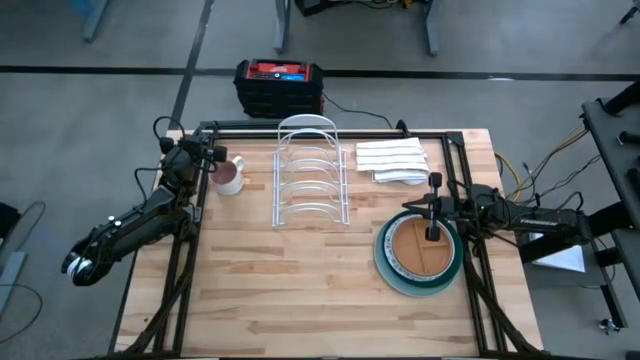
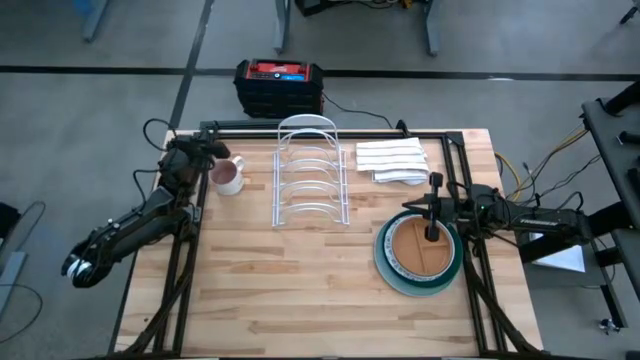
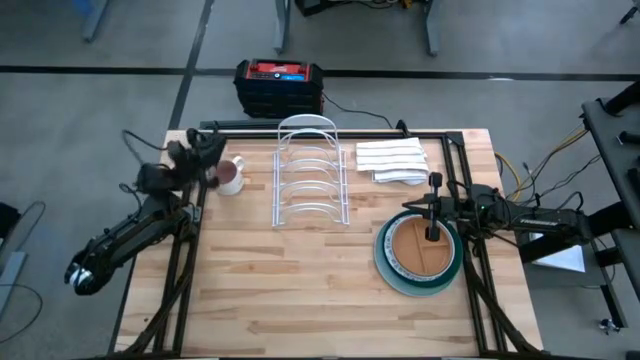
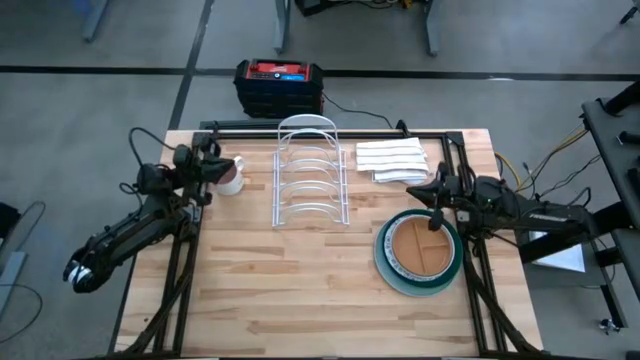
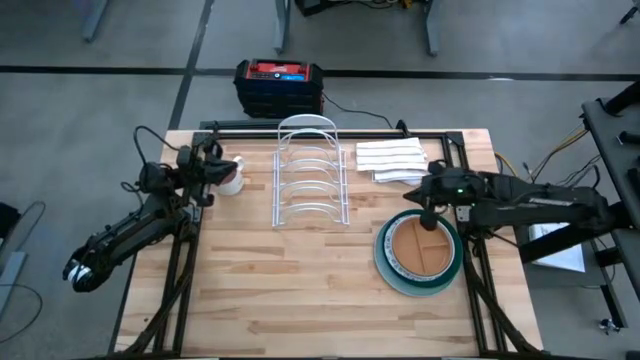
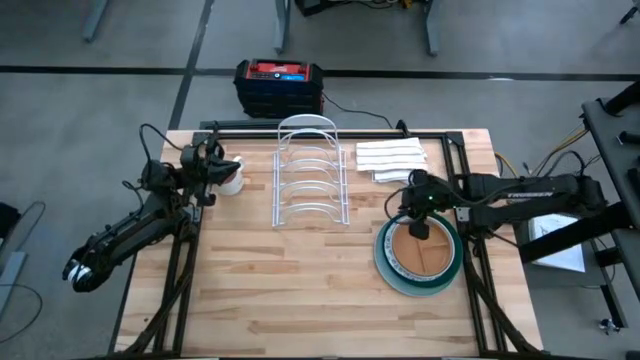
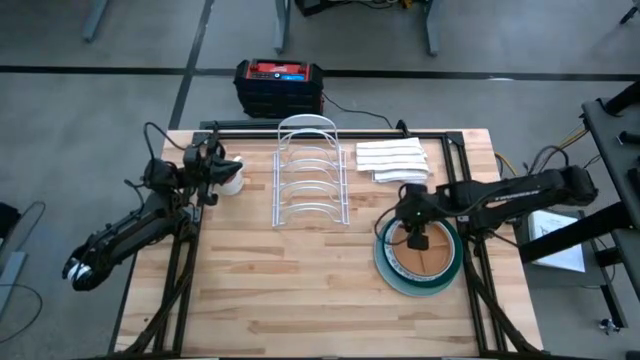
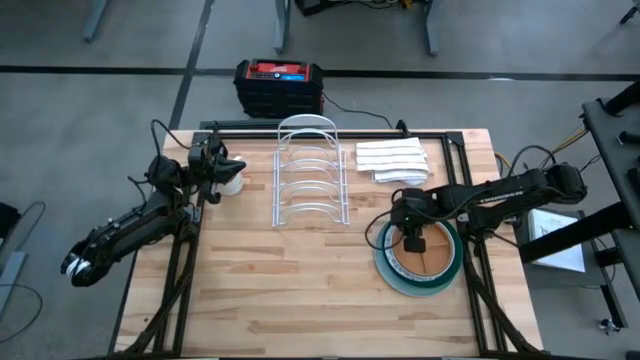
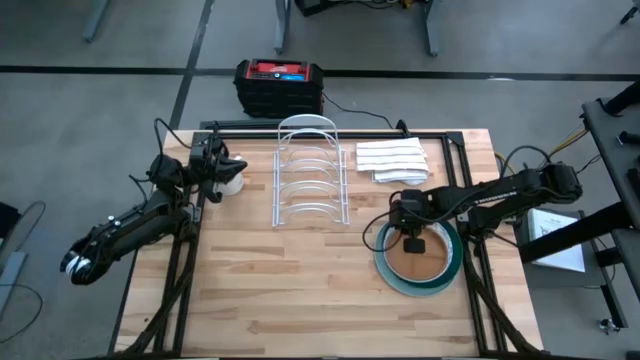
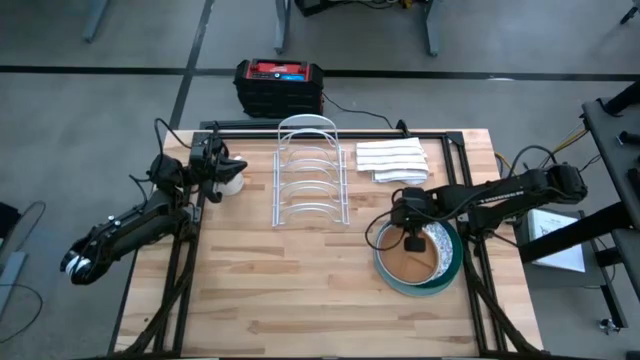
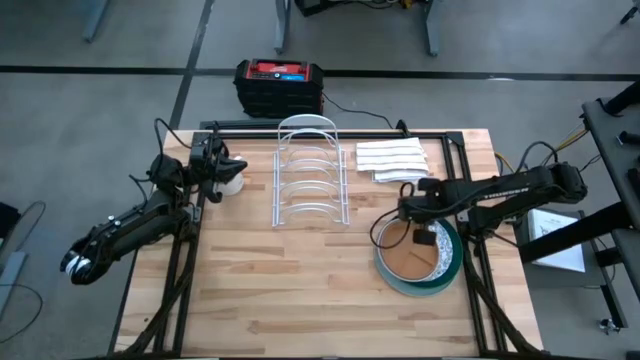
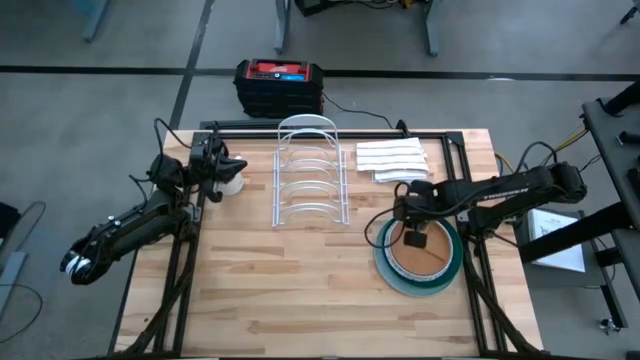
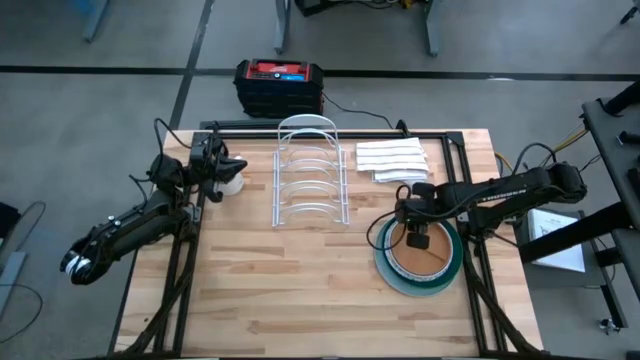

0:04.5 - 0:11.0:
Task: Sort dishes
Put the brown plate in the dish rack

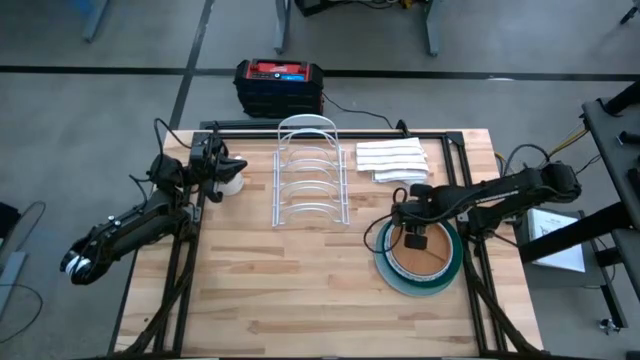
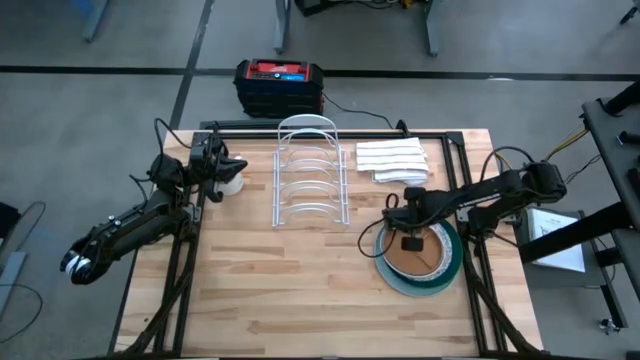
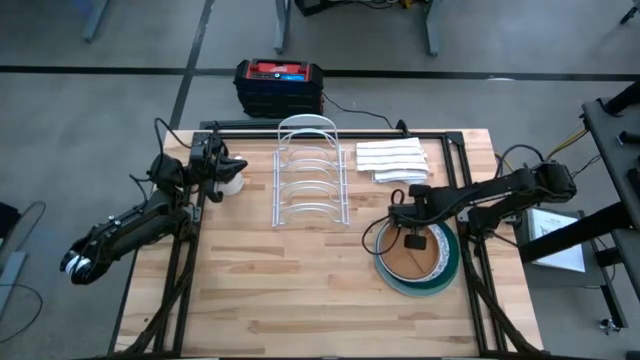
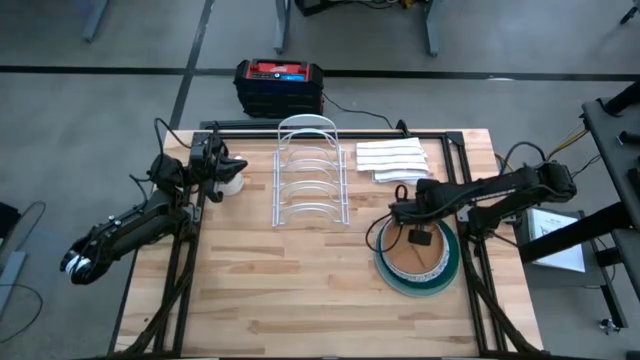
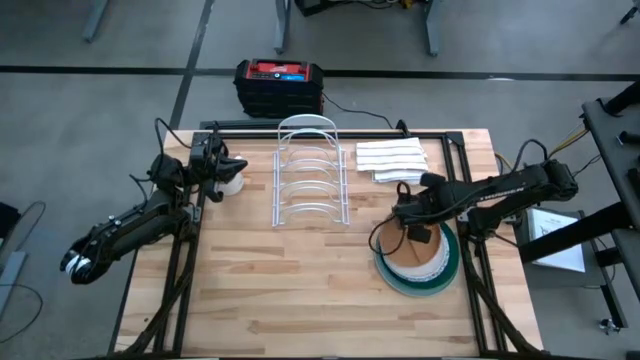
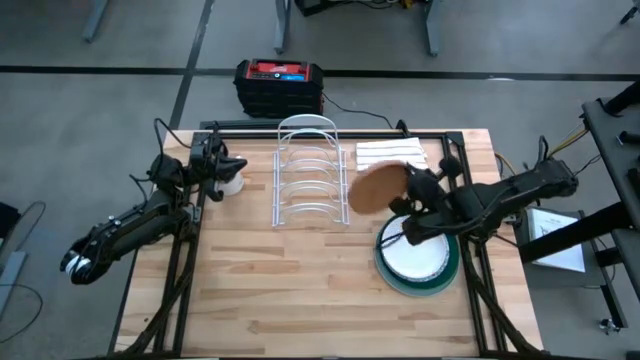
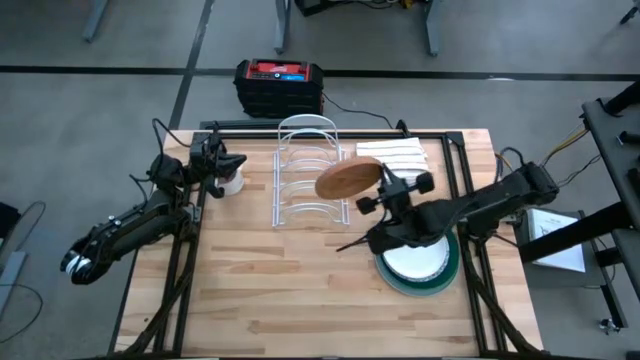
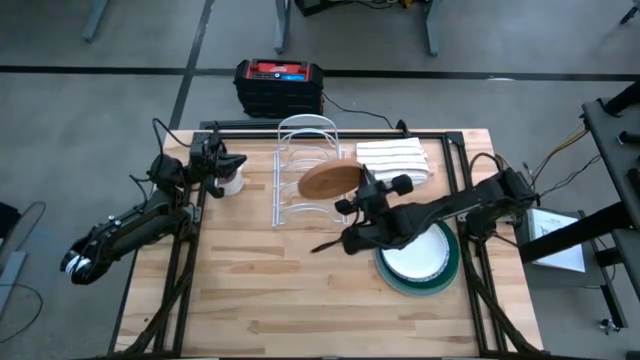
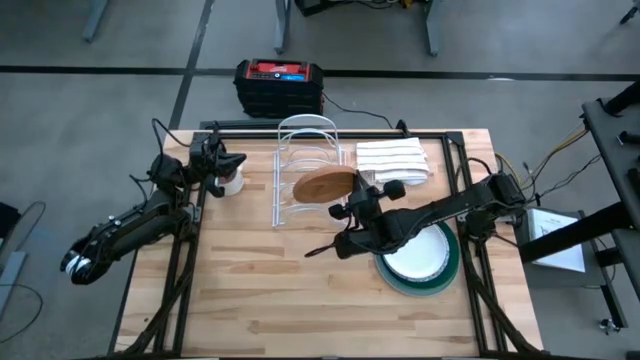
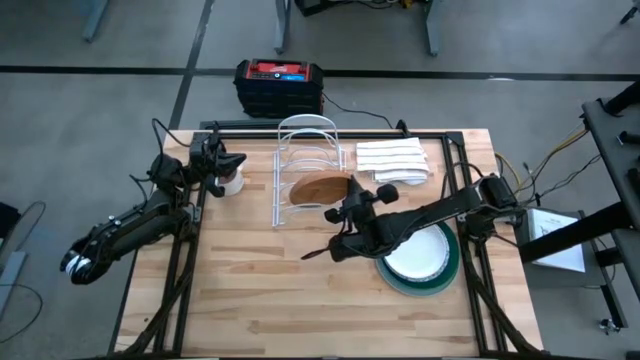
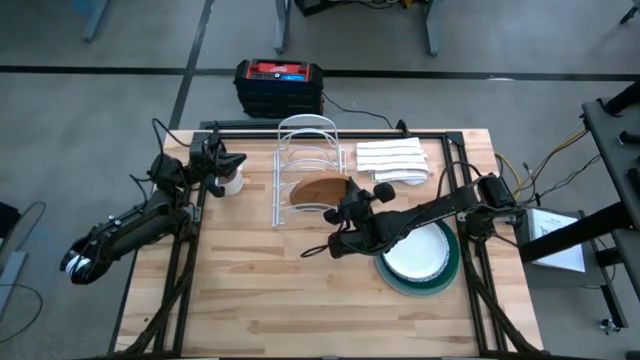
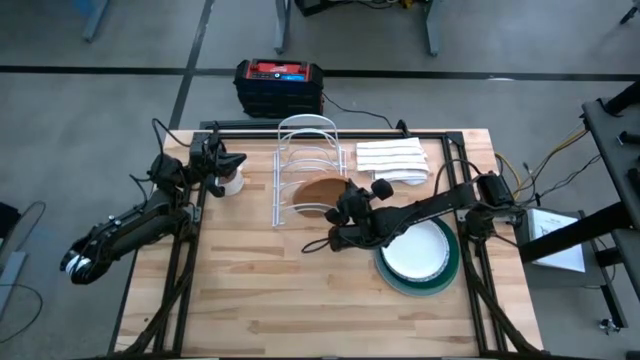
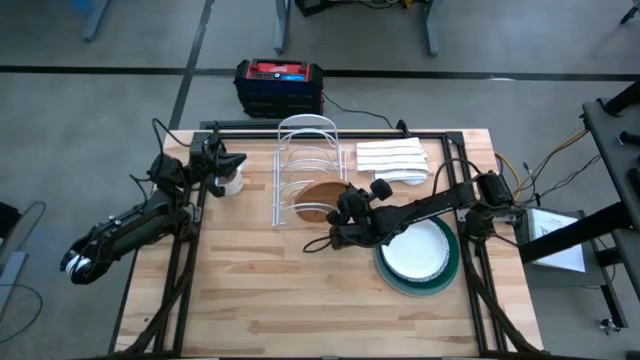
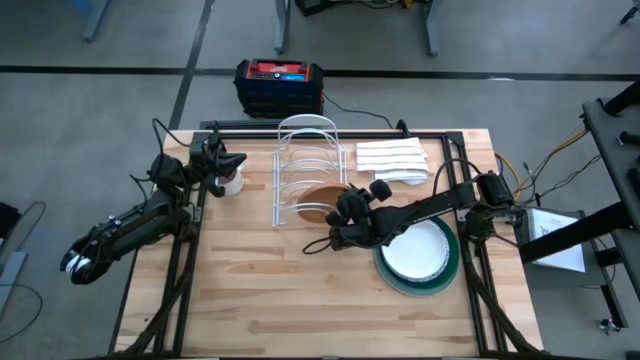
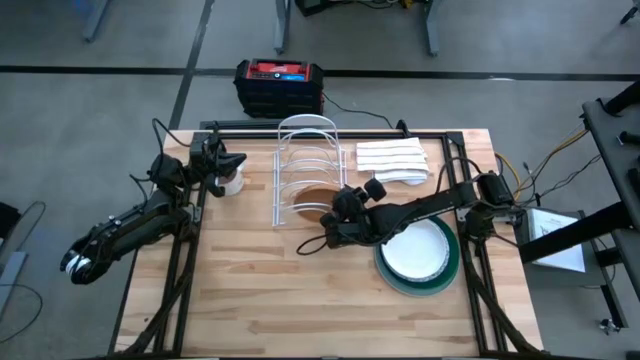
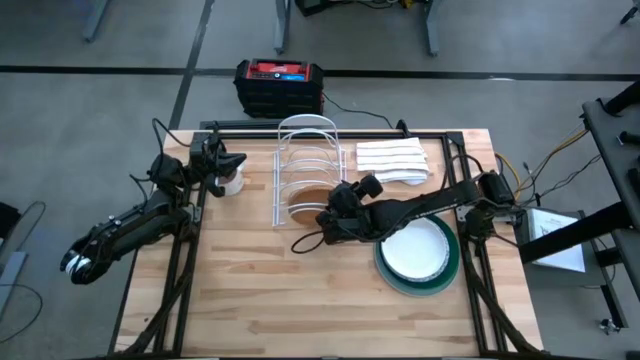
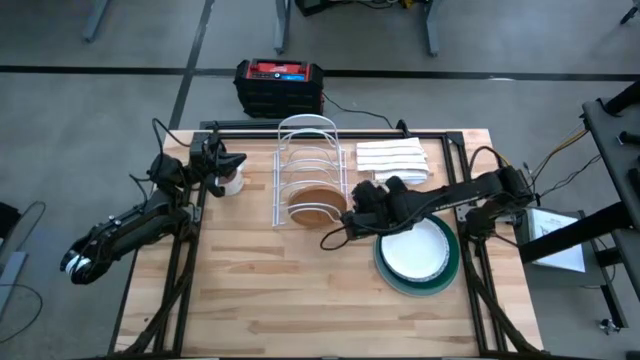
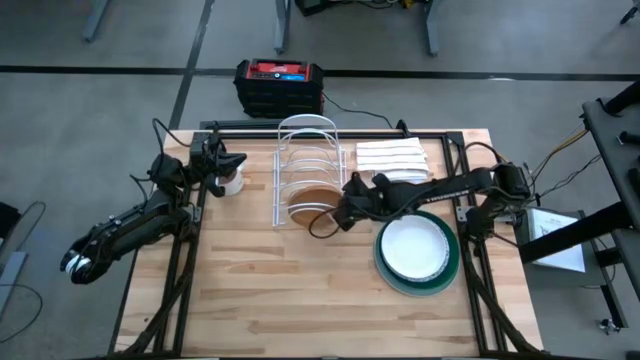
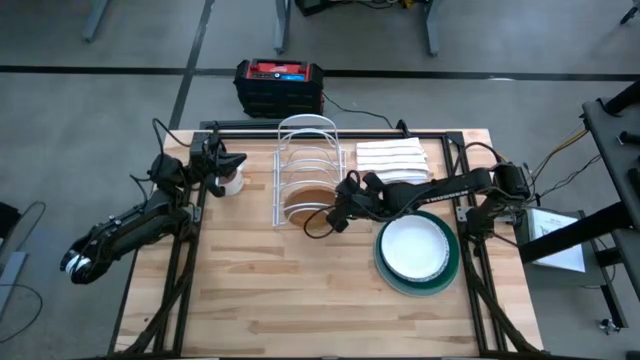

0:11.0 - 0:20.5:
Put the brown plate in the dish rack

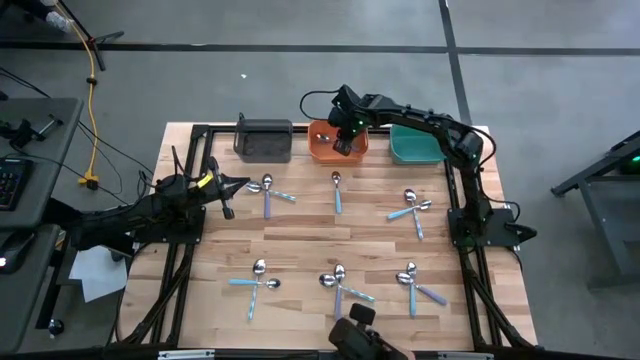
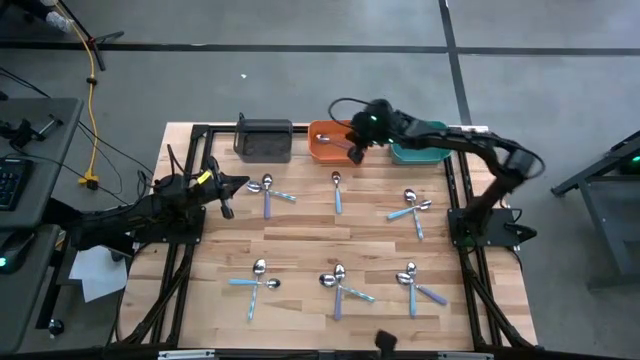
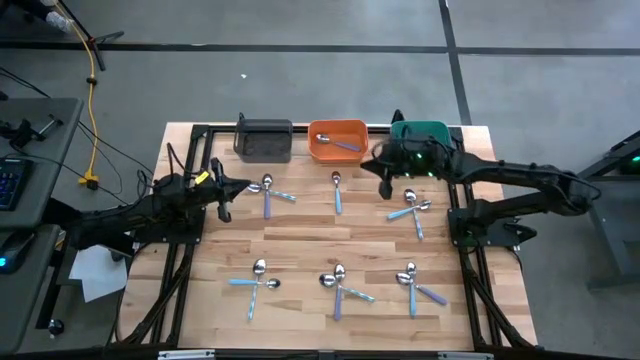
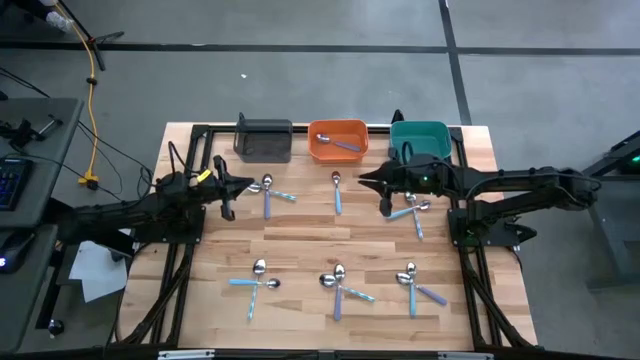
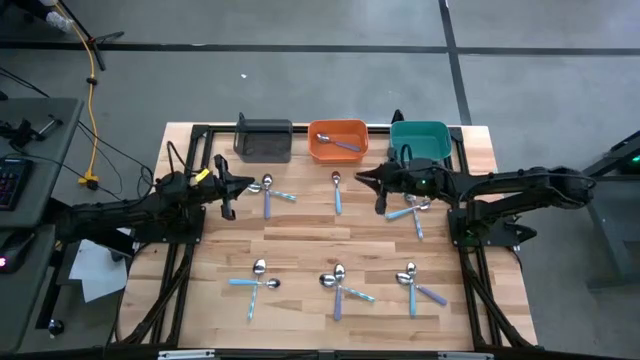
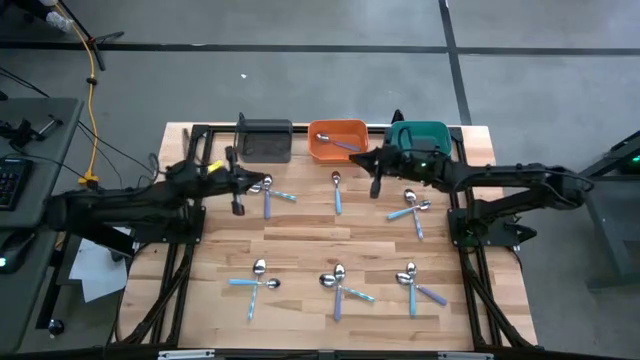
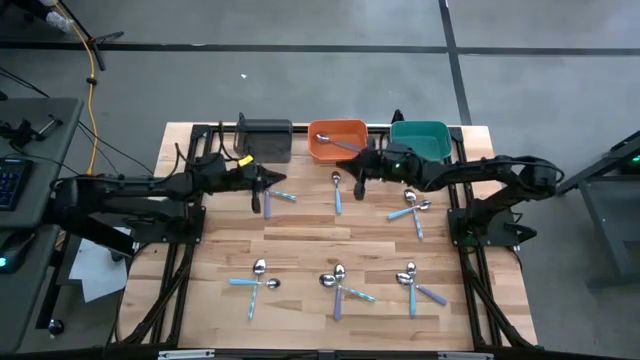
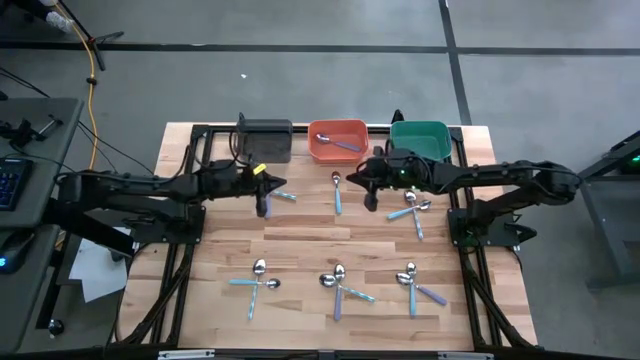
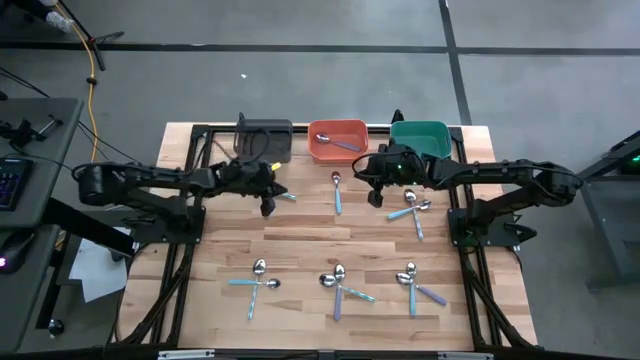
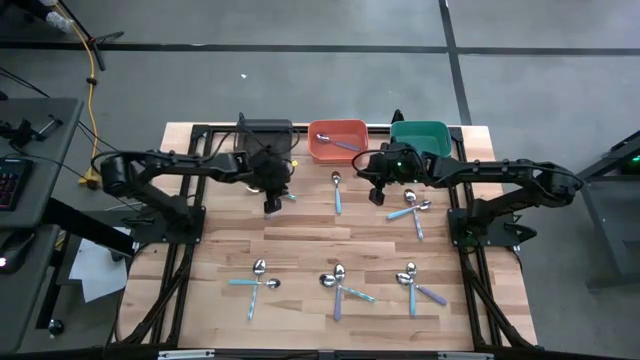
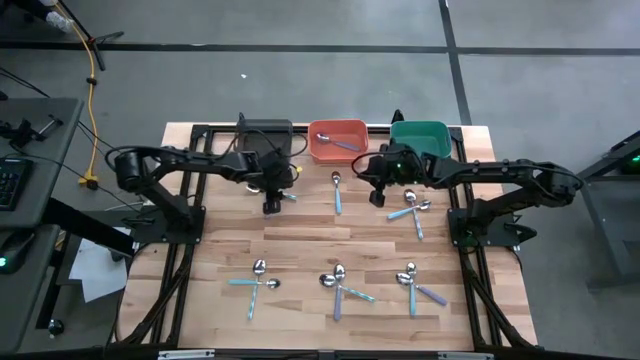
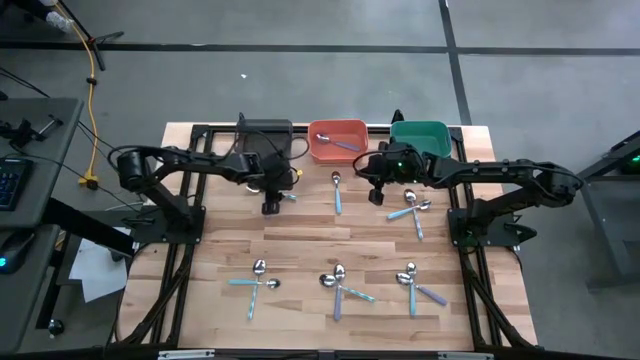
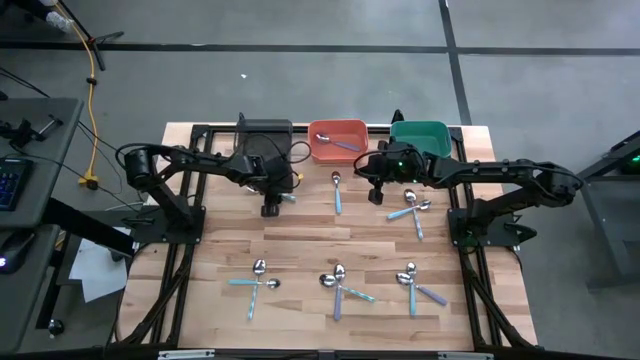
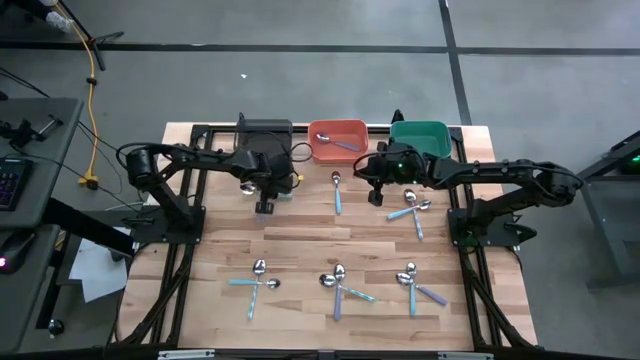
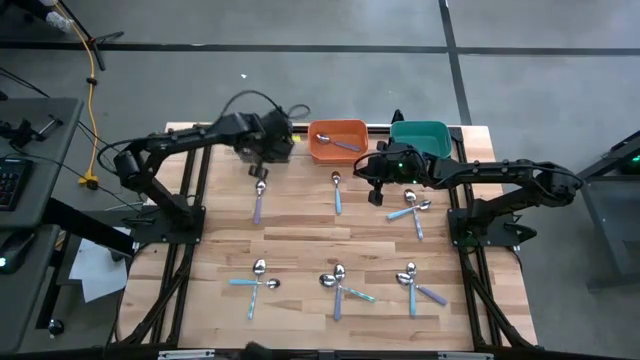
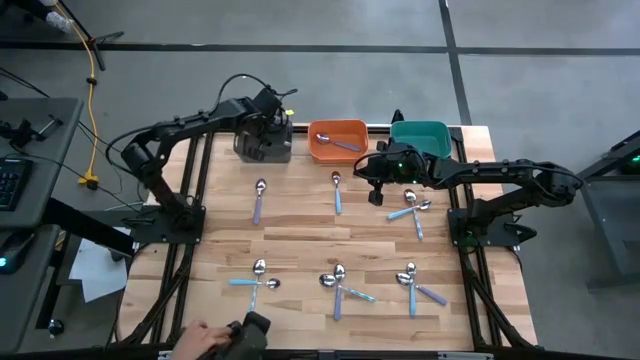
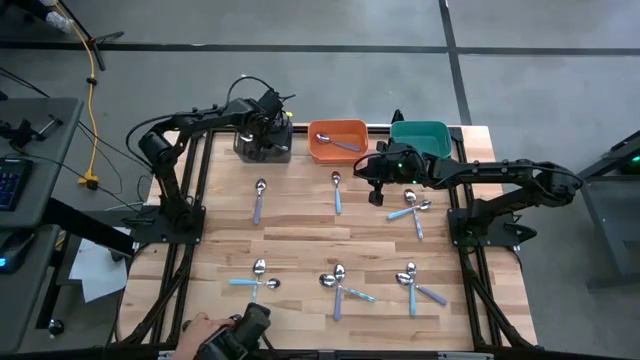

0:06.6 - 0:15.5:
Task: Sort silverware by color (type)
Put the blue patterned spoon into the black bin
